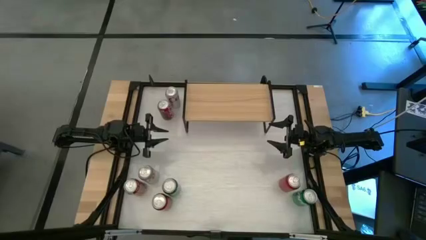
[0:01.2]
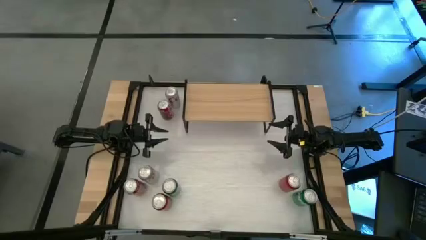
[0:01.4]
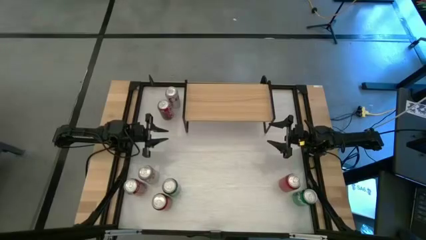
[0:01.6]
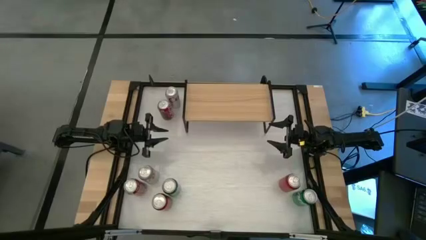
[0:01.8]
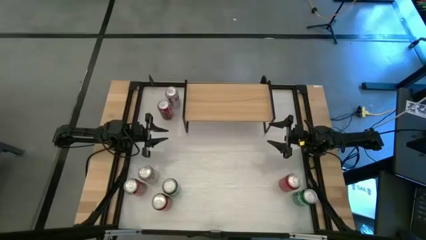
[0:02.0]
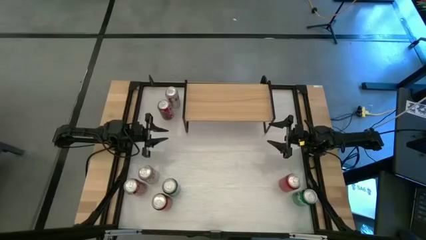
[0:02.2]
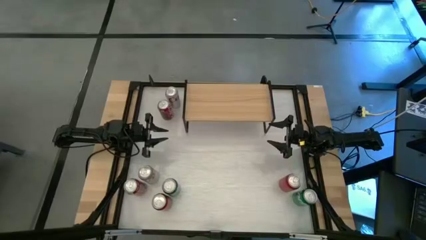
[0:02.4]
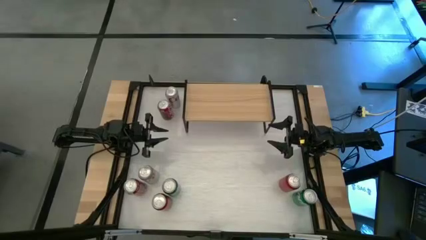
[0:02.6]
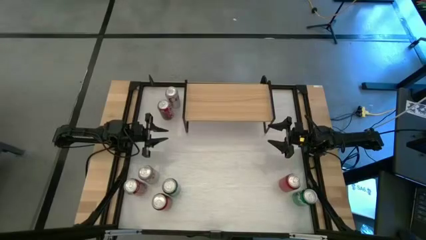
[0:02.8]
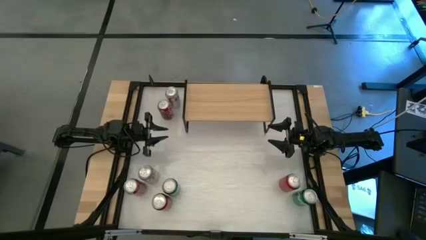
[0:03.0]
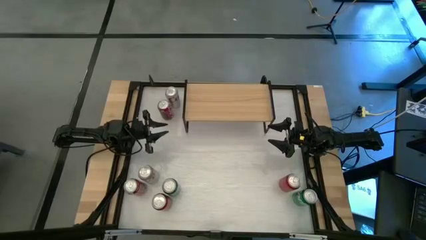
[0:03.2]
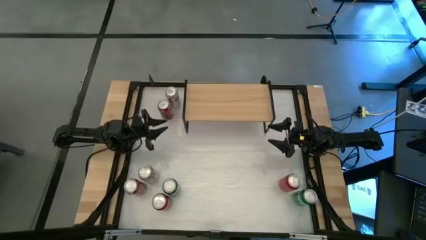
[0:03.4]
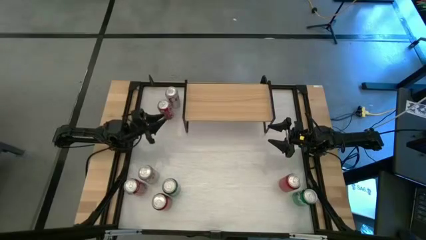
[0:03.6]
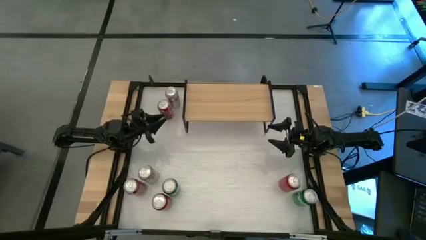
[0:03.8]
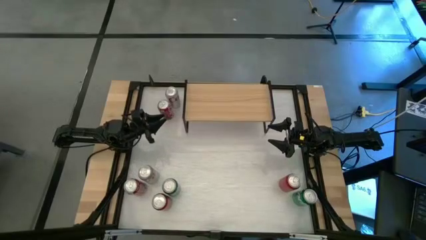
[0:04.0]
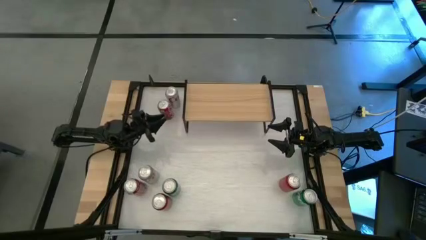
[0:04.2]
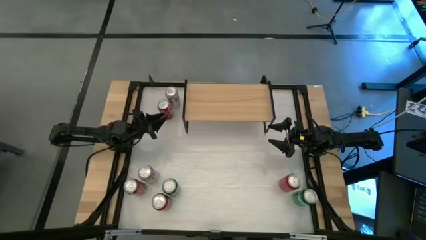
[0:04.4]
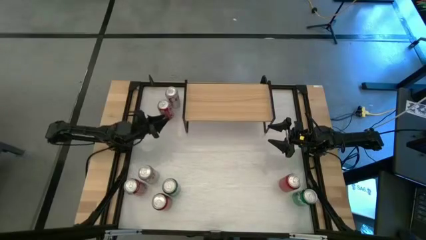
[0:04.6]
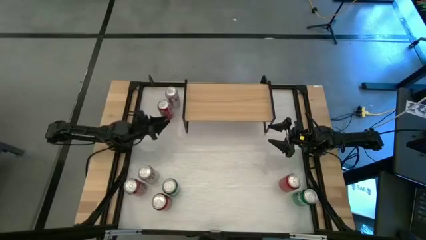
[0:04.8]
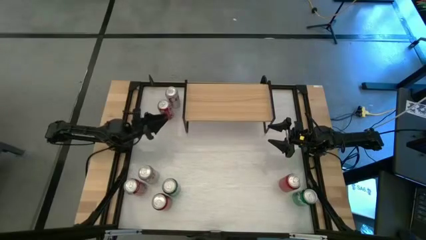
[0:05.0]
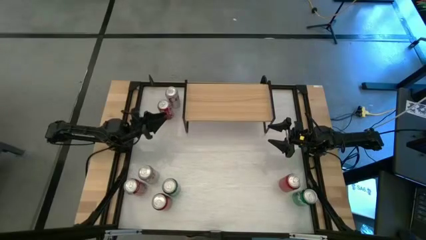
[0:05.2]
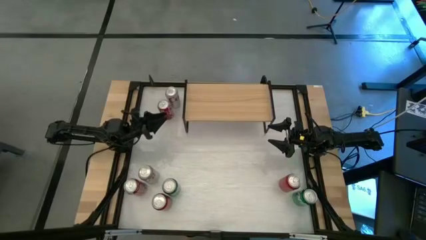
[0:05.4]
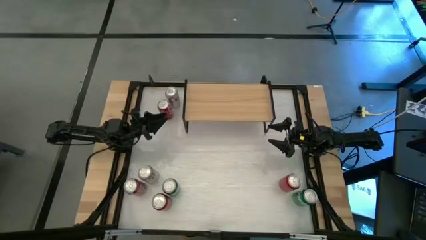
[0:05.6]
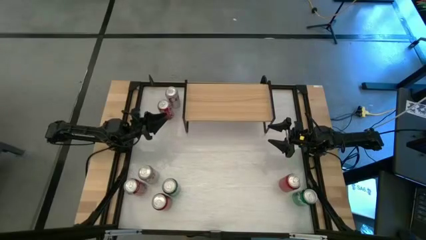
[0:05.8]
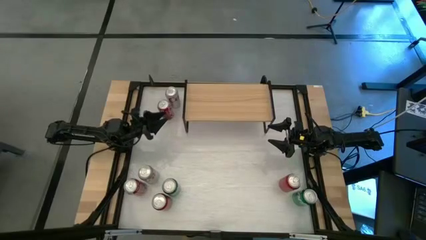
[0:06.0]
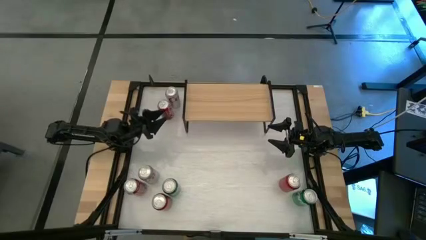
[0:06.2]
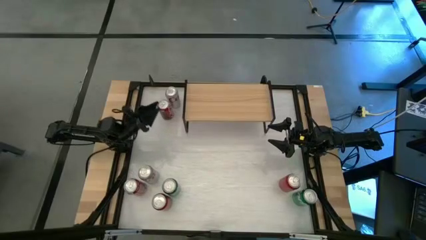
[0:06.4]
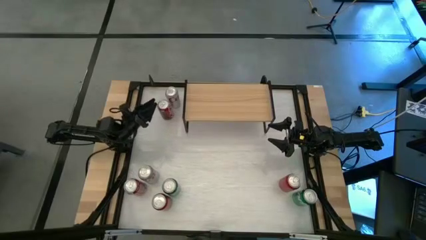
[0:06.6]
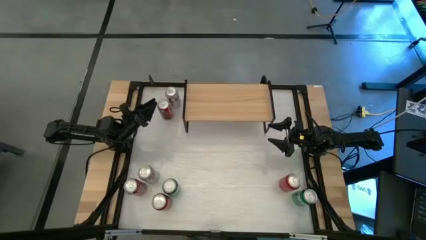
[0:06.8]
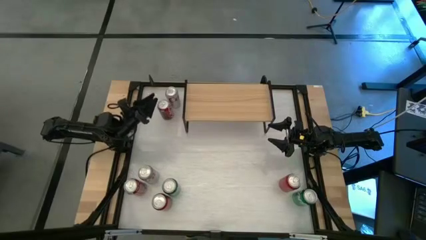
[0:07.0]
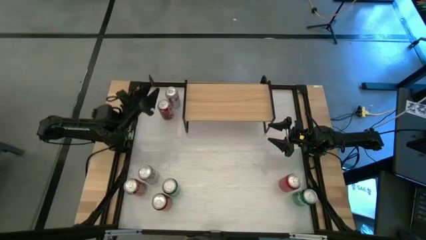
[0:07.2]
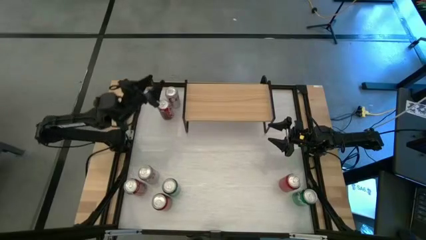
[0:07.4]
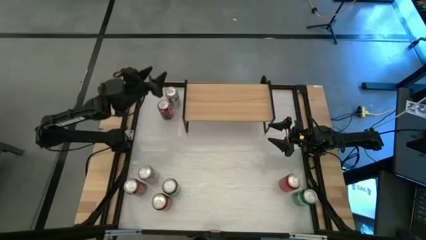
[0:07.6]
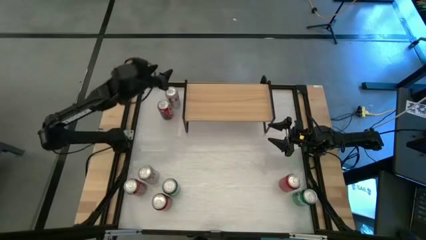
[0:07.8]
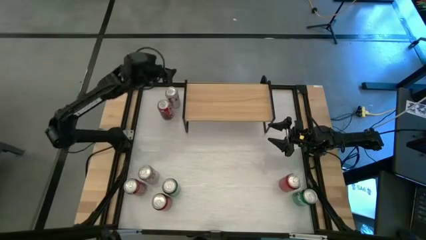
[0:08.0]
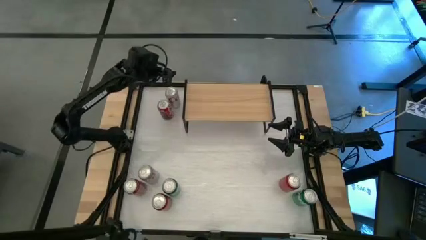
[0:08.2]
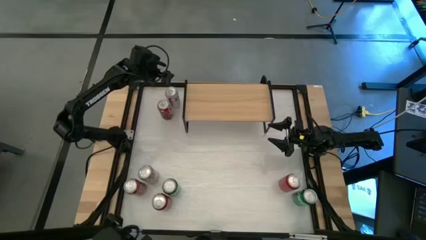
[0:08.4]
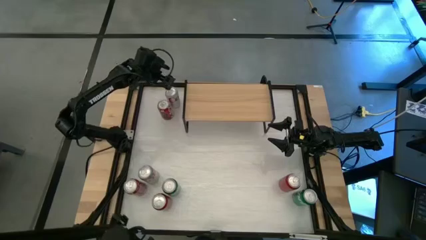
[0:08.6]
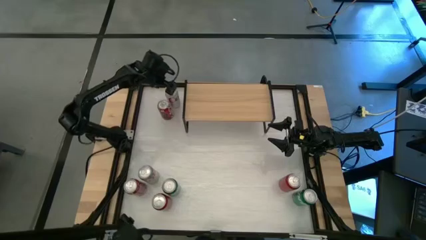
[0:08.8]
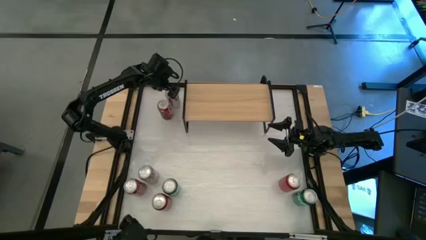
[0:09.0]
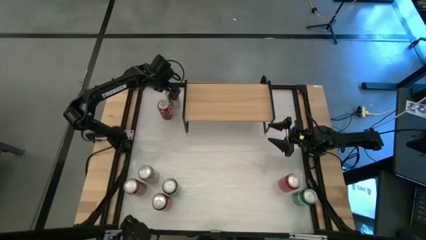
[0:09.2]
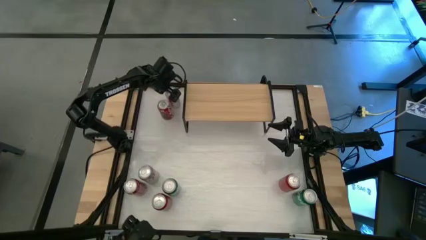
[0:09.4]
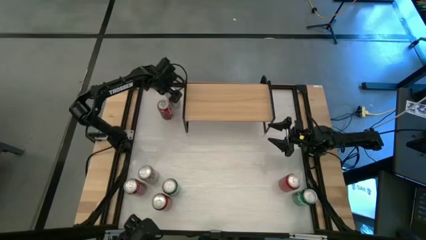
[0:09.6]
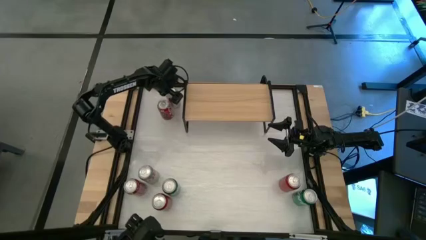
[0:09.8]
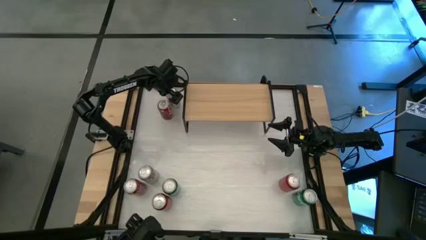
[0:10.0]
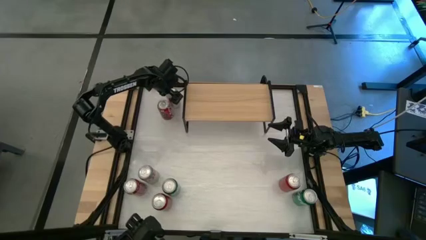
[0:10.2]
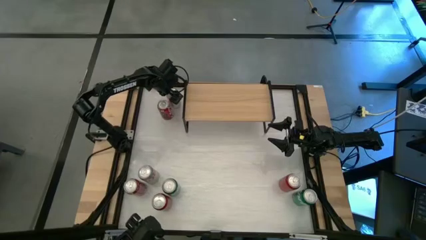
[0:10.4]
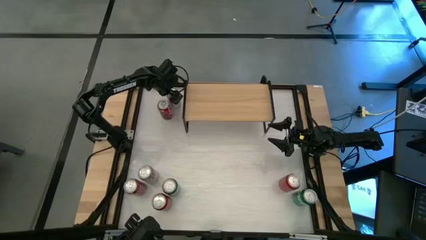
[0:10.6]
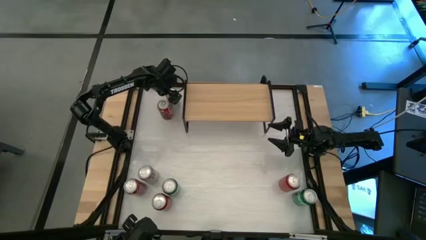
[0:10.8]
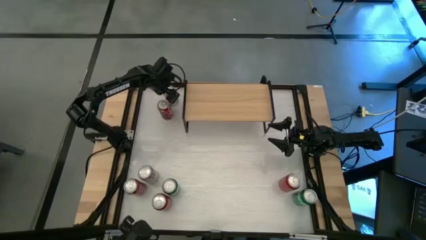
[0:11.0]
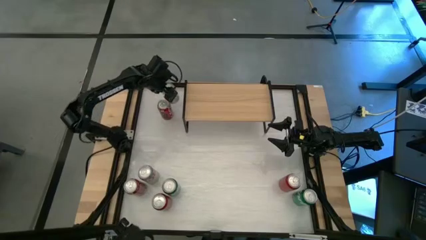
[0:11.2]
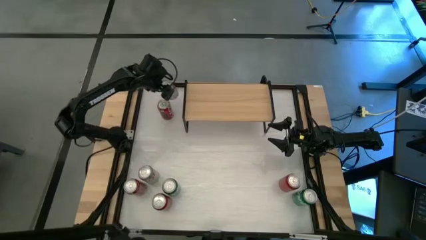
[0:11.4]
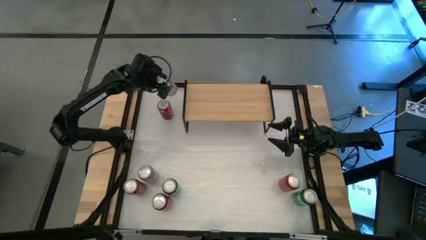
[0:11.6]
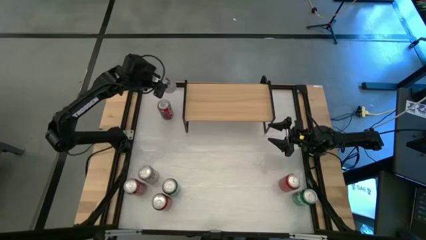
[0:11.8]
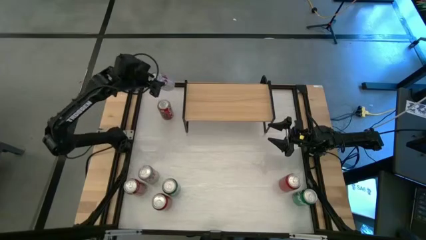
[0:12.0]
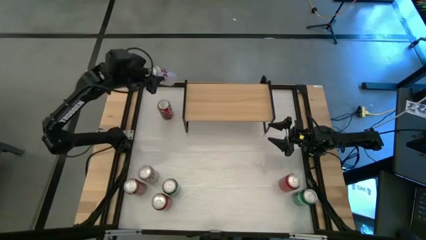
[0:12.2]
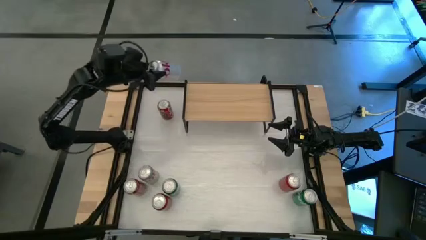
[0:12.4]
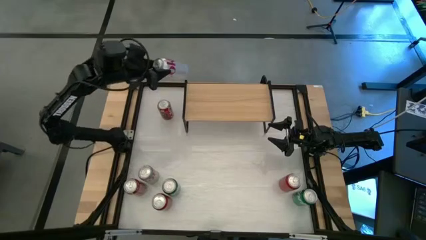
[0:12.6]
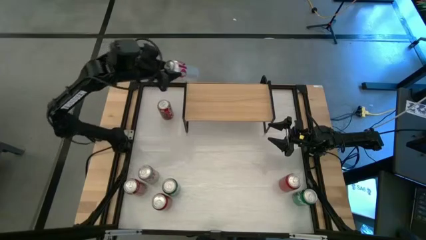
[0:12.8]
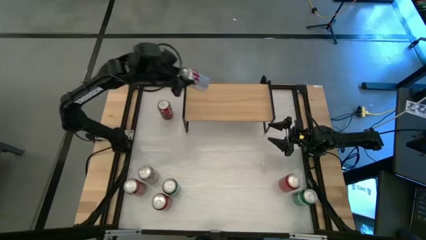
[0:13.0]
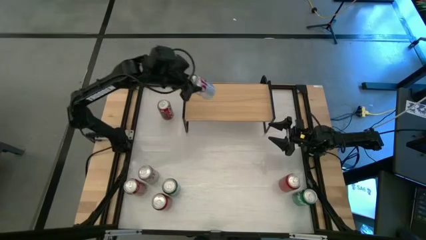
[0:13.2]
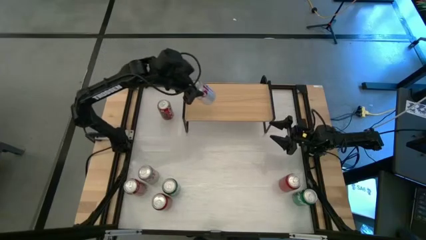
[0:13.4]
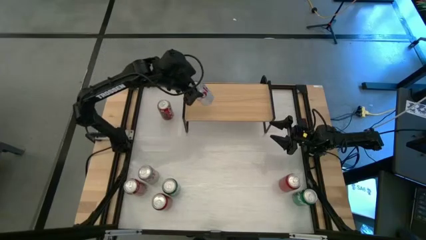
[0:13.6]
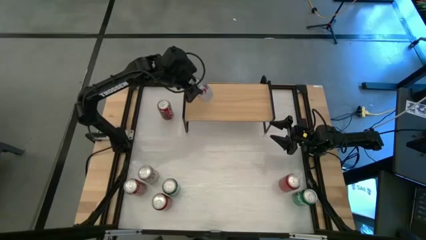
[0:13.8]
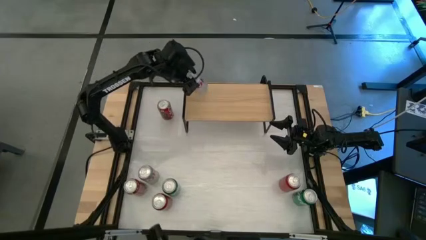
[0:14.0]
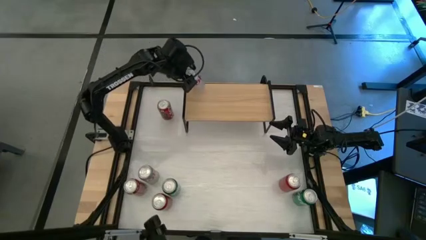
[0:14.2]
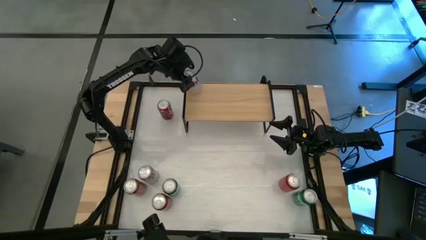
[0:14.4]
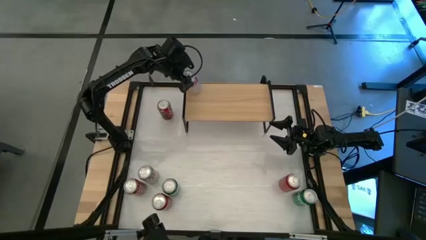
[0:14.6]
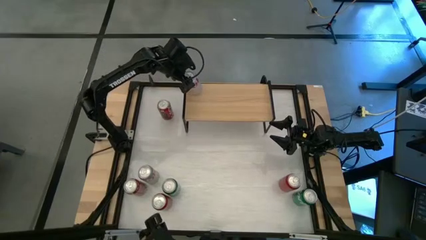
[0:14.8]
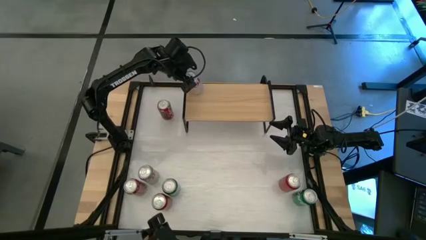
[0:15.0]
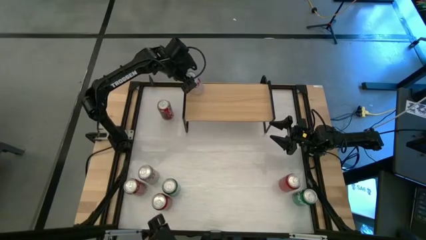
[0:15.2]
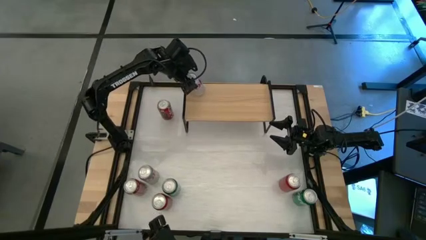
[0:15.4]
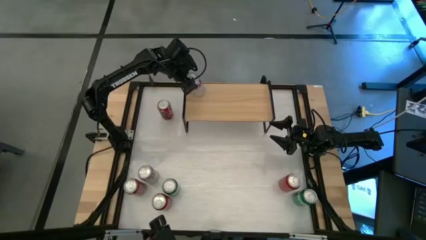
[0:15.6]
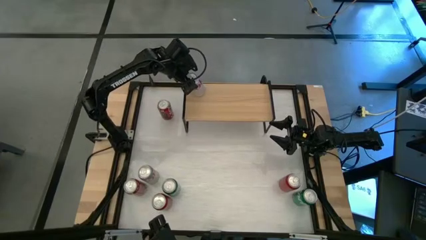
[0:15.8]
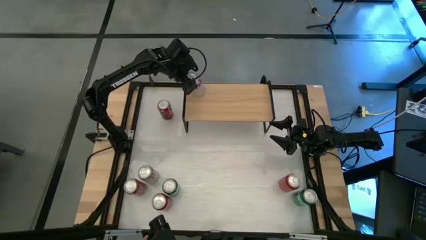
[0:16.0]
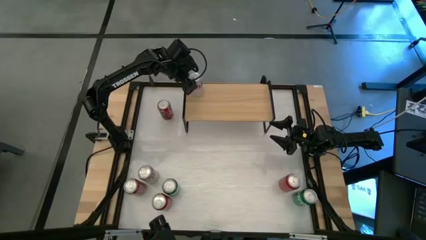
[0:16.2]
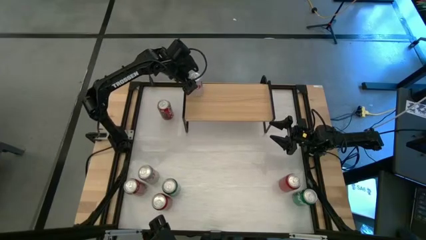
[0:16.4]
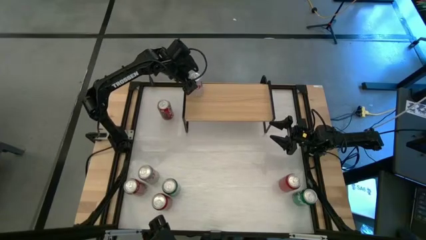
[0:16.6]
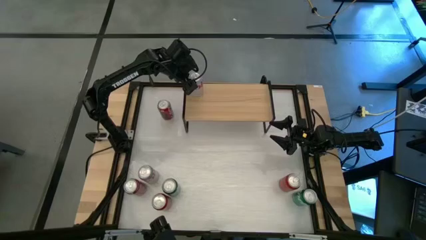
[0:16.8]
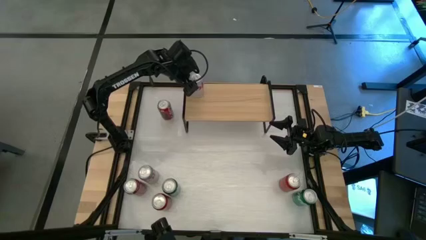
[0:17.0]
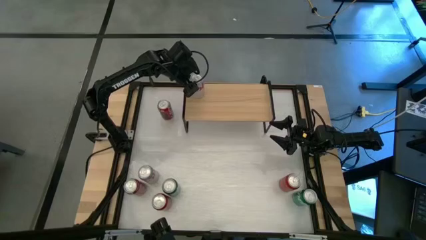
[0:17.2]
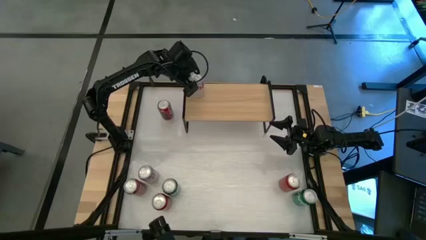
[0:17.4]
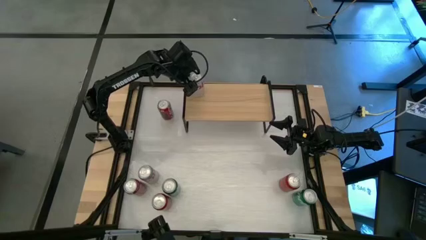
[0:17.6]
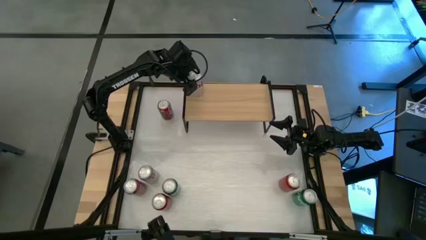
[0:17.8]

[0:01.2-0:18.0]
Task: Place canned beverage on shelf
Put the top red-silver soda can on the shelf
